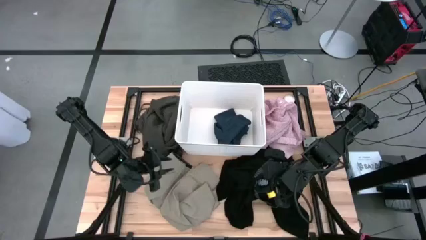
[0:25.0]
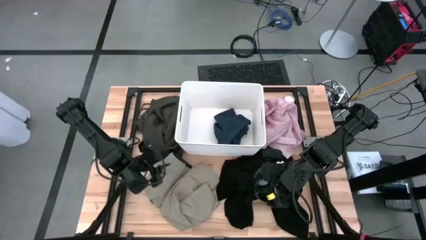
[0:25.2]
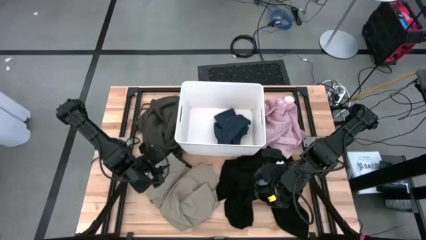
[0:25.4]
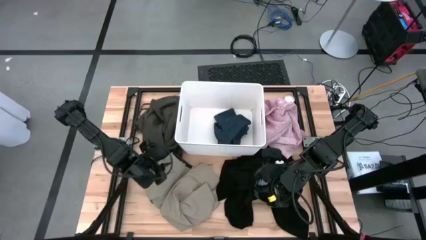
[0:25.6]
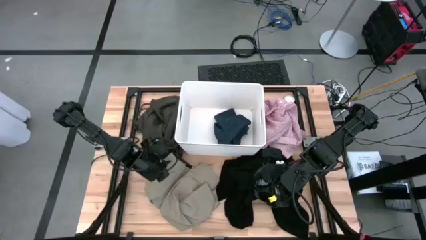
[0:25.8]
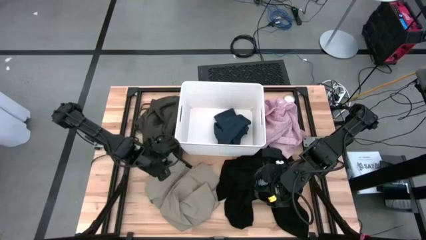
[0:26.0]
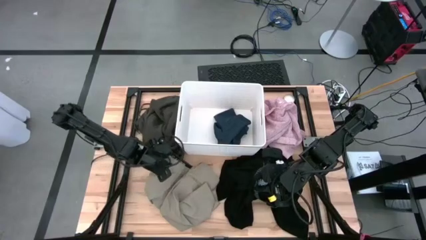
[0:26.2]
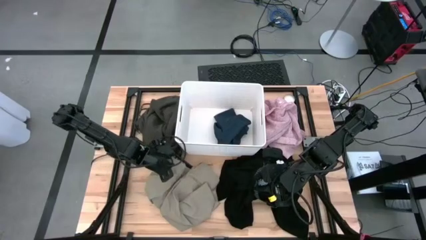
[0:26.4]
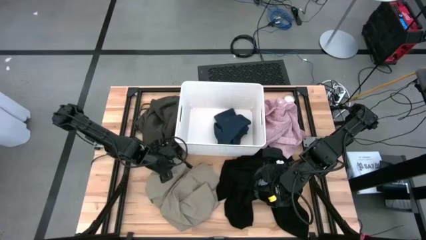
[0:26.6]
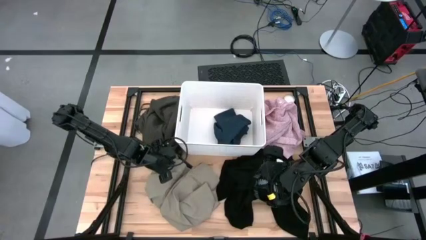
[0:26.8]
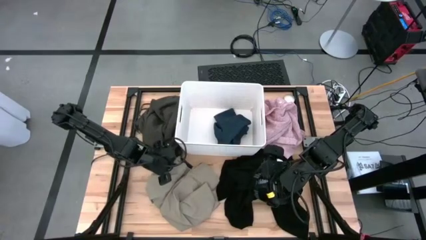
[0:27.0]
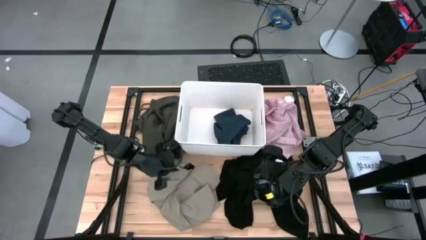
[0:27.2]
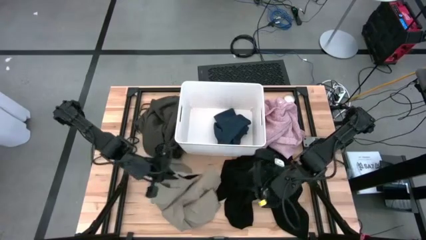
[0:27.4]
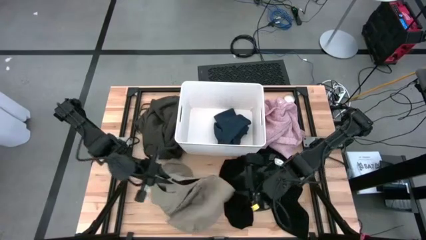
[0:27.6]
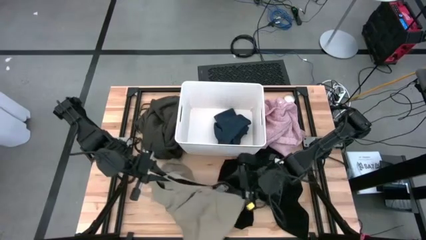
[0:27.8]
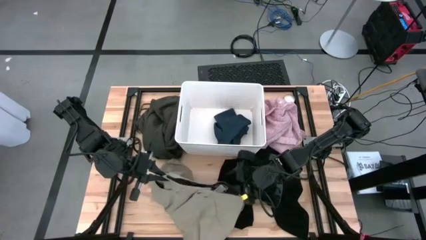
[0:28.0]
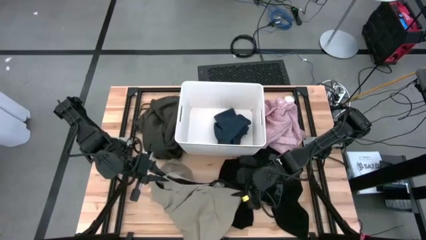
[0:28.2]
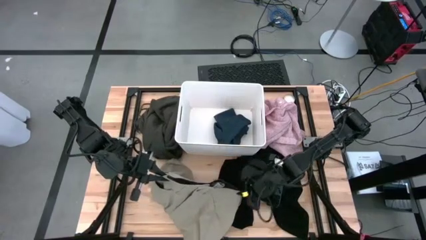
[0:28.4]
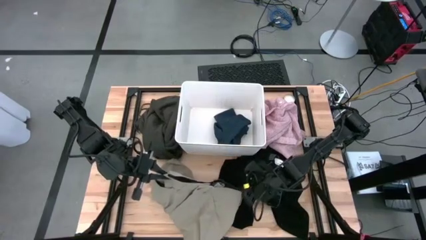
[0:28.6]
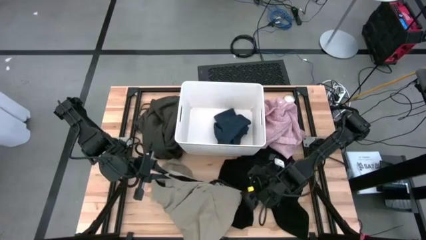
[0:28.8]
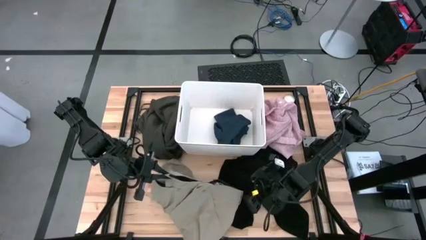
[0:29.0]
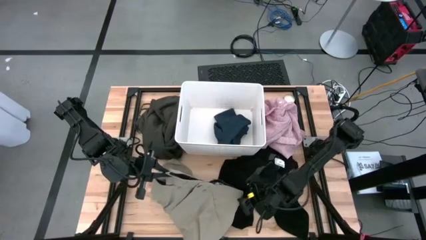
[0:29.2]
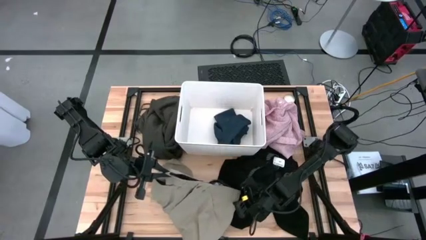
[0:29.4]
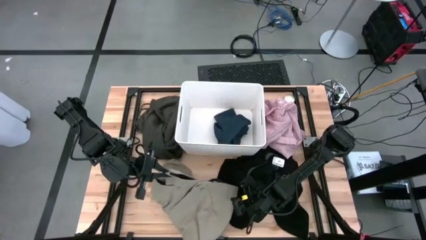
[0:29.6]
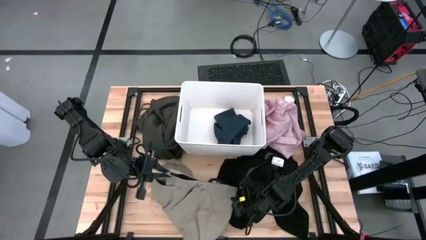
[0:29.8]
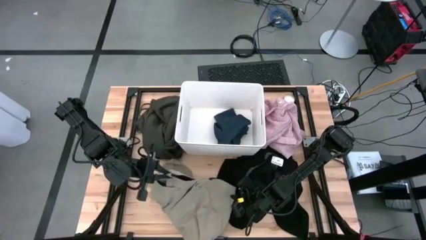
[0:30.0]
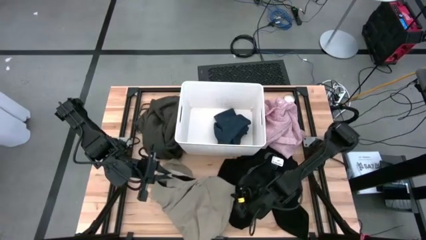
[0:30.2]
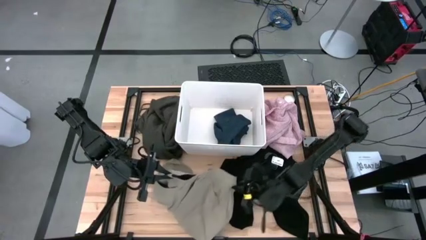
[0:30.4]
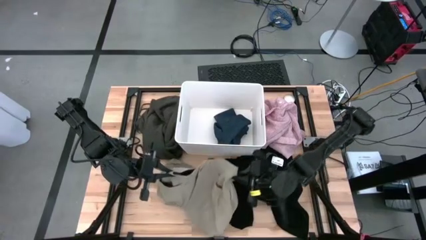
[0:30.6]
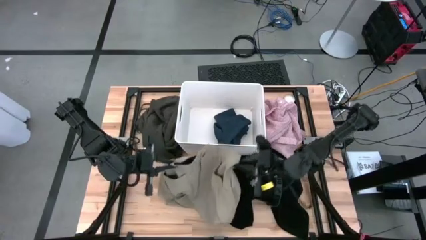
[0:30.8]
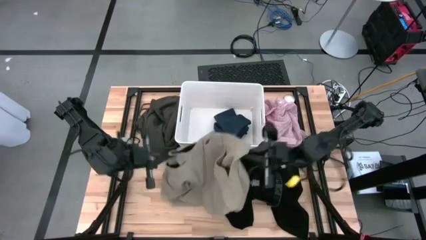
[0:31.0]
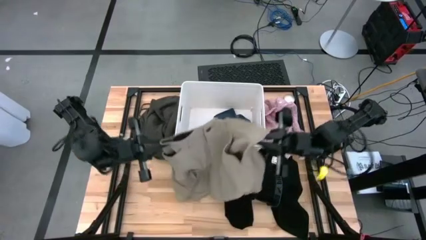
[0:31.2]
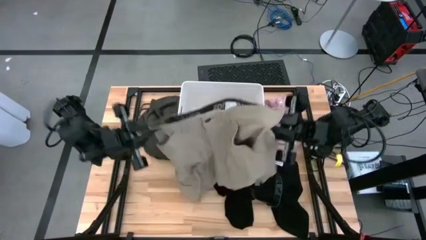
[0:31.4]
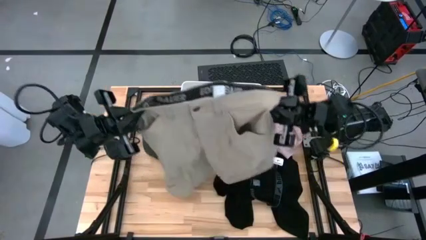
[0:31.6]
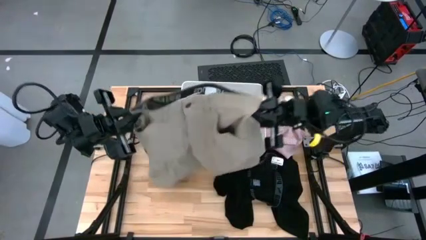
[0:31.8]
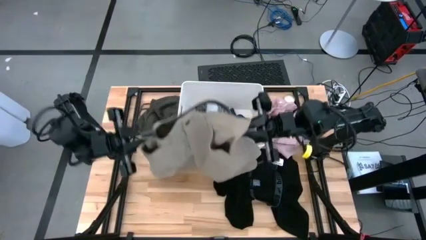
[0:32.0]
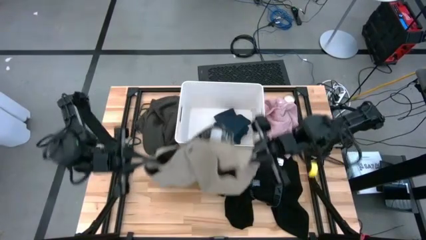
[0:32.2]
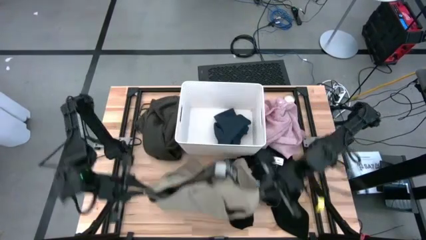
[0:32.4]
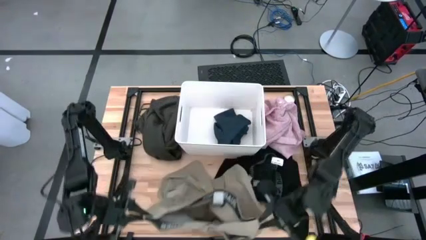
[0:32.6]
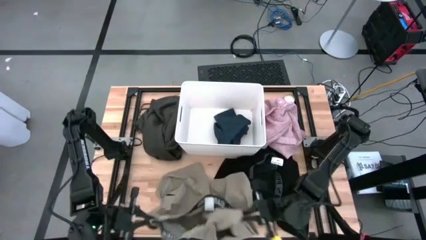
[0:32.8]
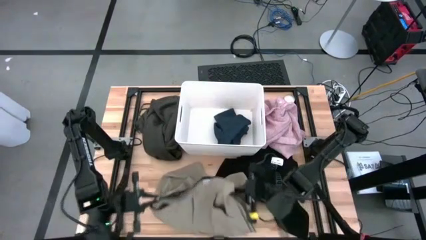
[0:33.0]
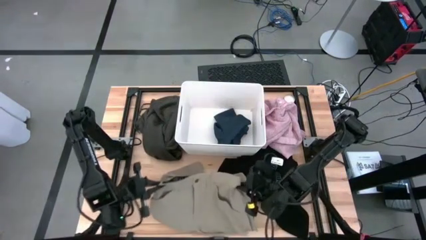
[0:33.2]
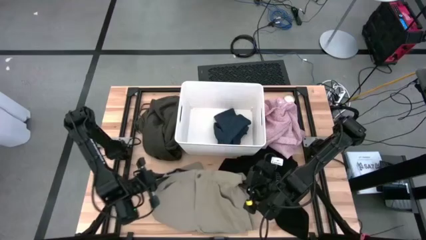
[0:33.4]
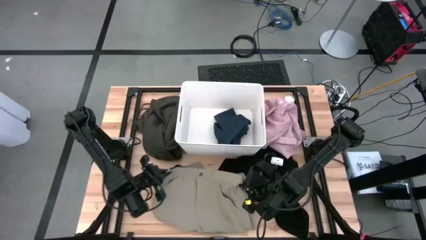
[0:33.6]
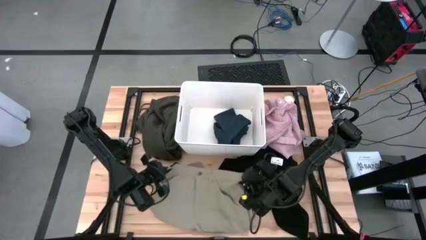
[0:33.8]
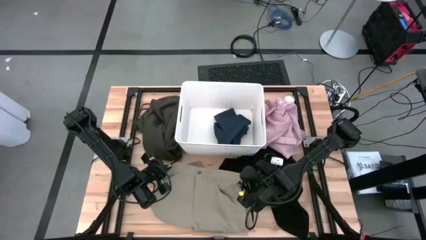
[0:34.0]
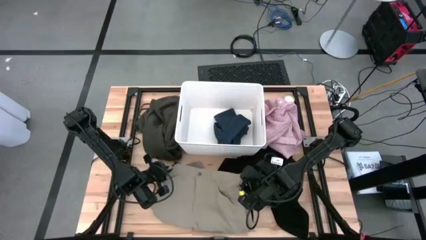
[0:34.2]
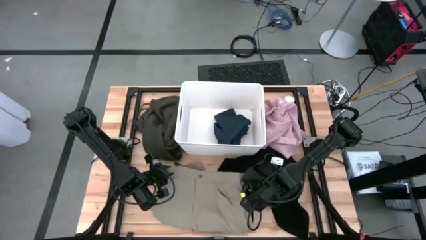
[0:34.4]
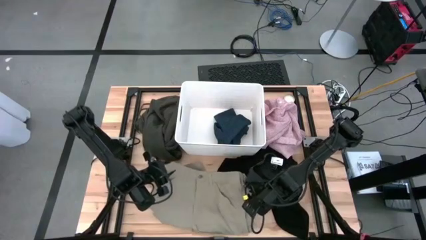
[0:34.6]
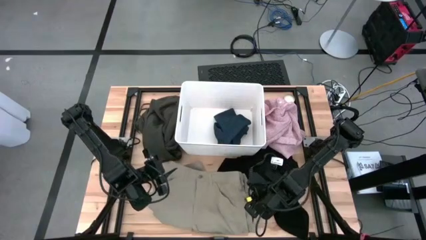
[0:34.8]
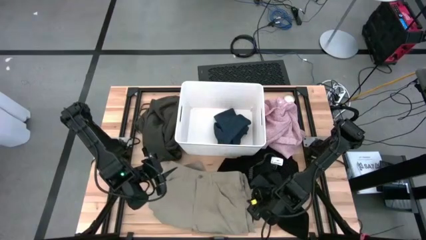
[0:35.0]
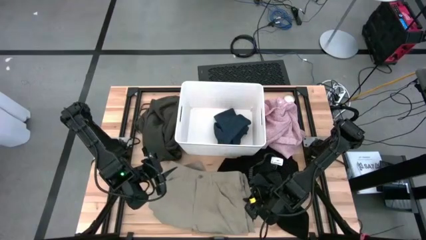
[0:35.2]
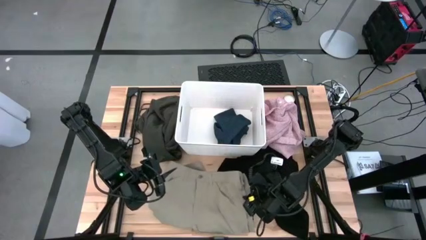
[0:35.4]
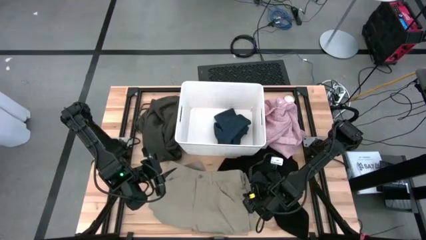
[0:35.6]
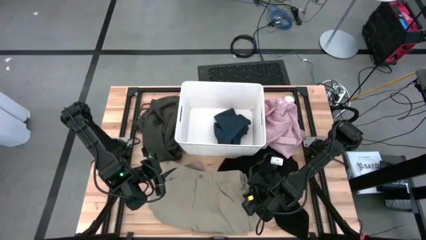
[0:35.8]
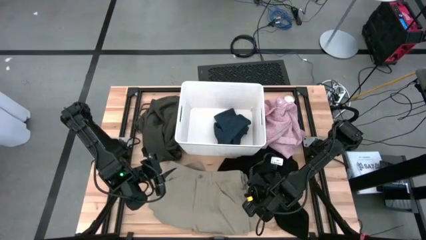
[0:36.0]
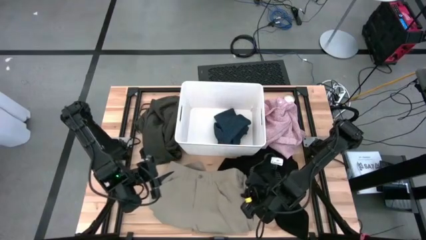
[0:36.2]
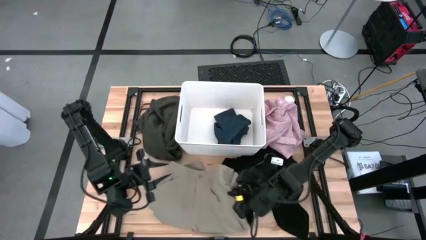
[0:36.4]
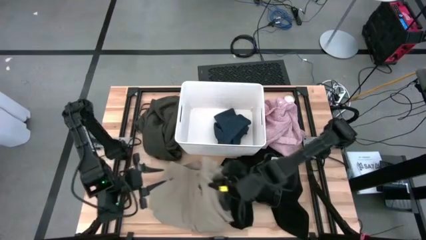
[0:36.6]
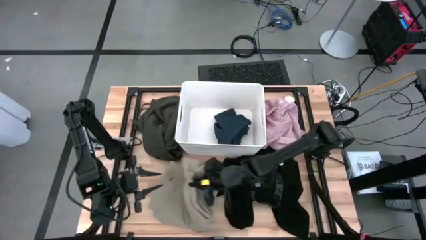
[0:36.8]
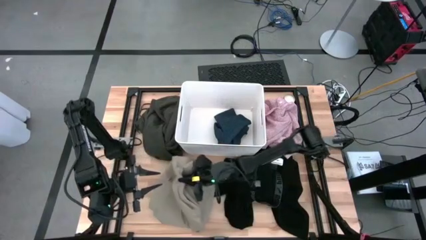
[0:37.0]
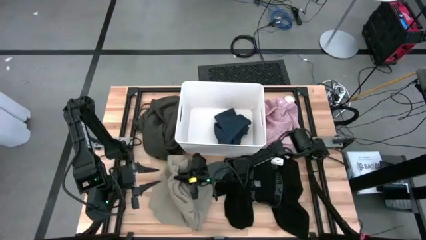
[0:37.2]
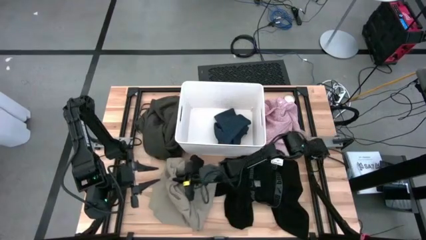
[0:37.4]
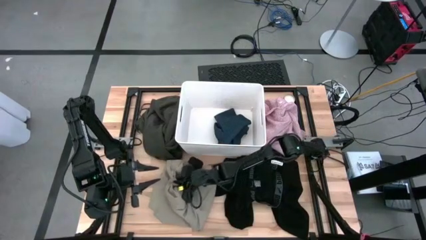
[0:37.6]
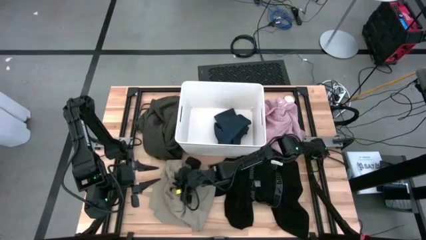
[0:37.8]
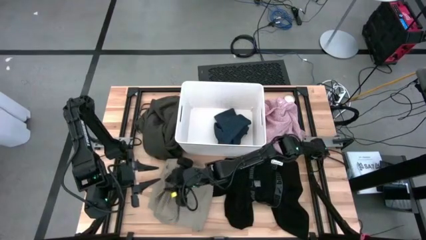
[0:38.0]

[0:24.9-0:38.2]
Task: Sort clothes
Fold the brown pants

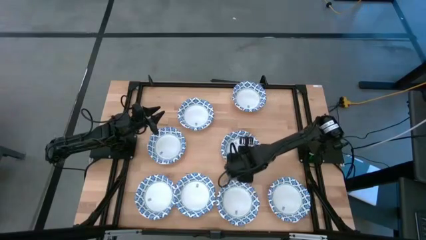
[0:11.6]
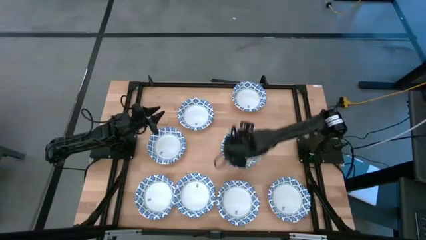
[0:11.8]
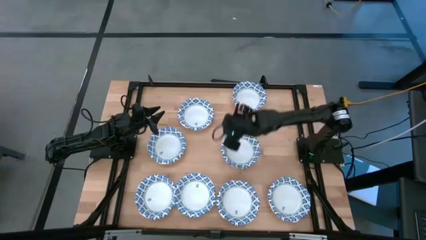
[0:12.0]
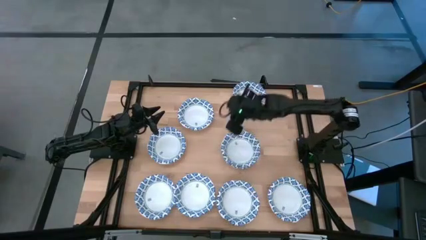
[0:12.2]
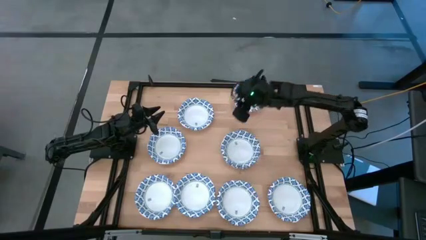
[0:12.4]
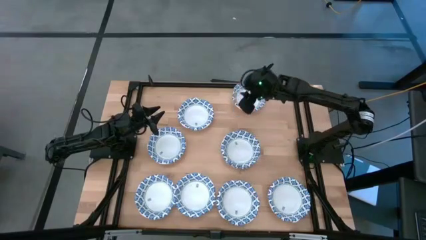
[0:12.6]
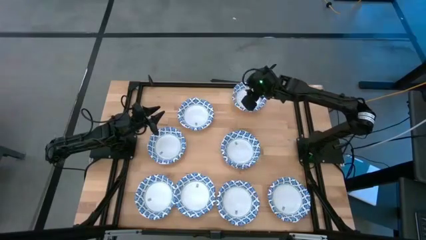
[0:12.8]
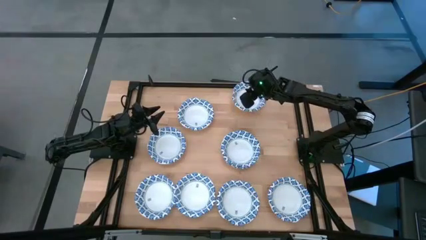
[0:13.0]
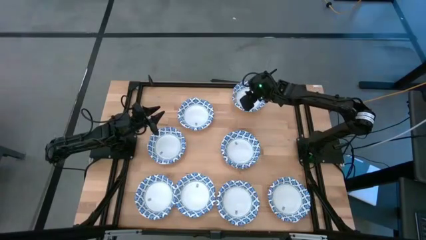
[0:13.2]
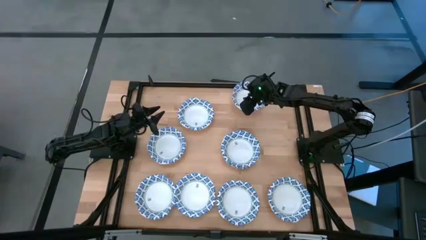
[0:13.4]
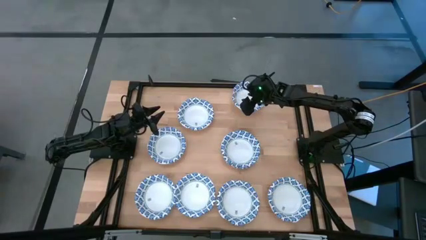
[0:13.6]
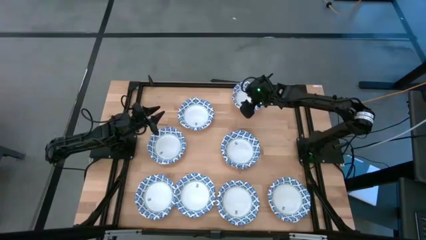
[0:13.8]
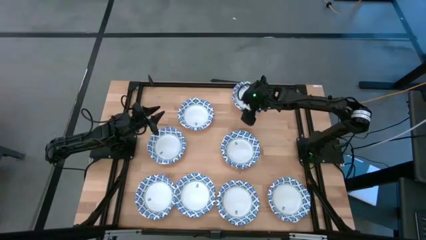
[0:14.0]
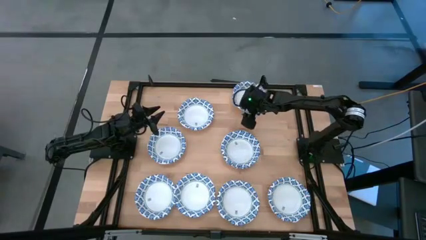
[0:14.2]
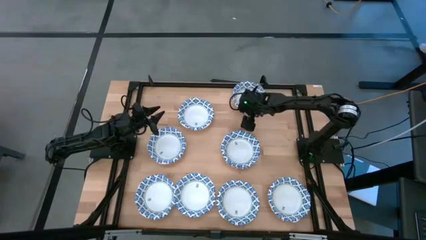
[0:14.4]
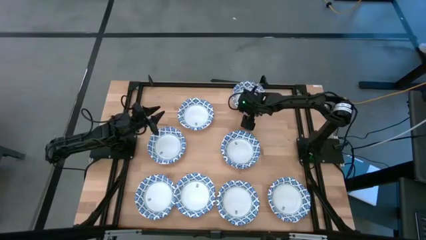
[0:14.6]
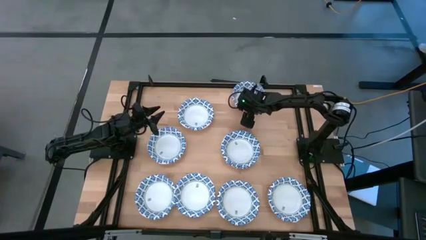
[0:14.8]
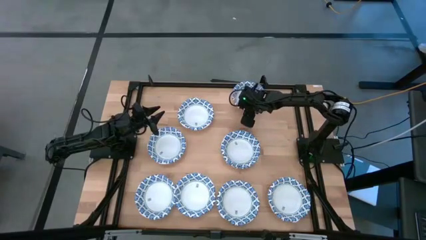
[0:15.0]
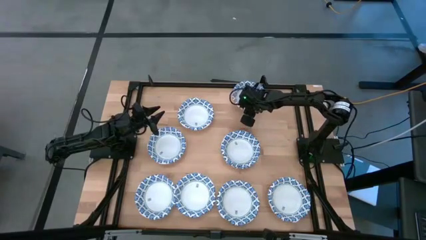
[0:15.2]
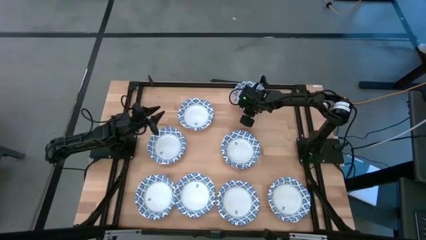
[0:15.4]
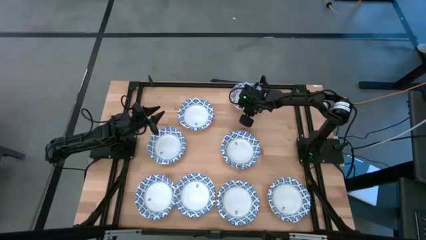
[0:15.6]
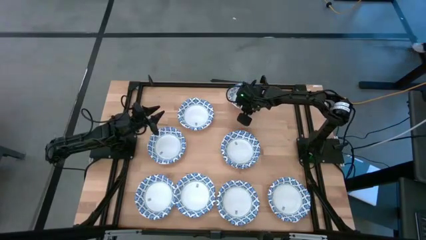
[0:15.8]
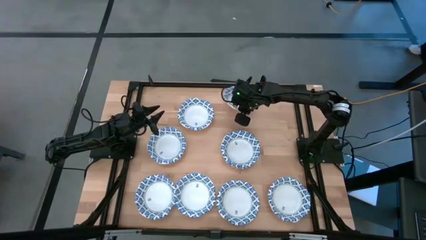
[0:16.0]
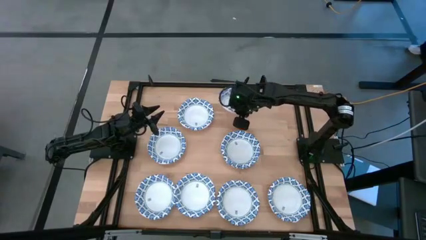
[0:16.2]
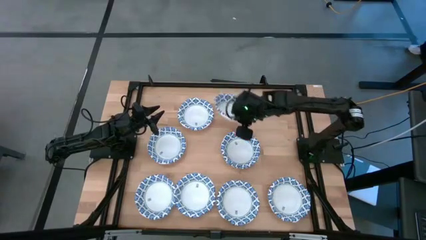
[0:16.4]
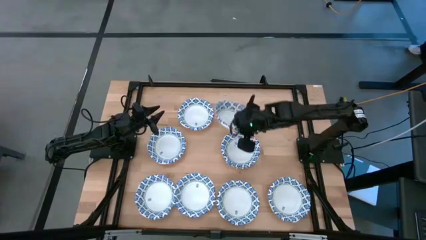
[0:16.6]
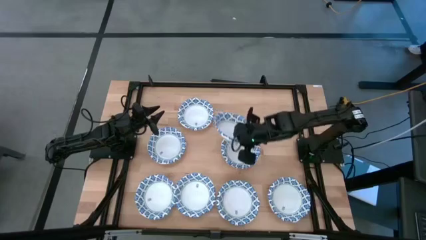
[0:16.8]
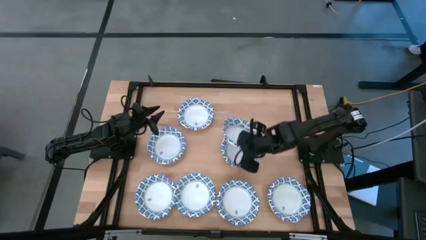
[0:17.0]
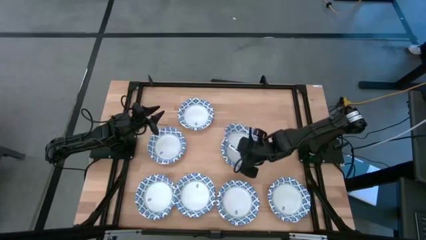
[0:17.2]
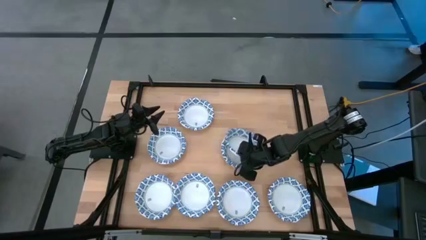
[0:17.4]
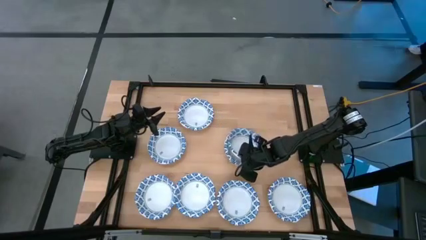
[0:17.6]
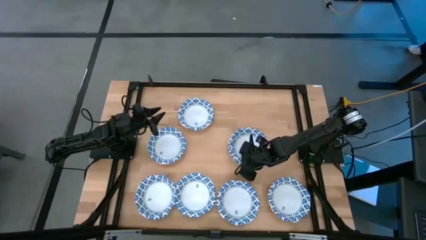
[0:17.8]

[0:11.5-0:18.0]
Task: Nest bowls inside each other
Stack the white bowl on top of the white bowl
